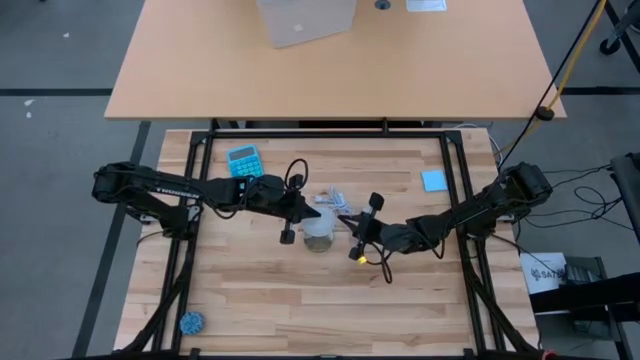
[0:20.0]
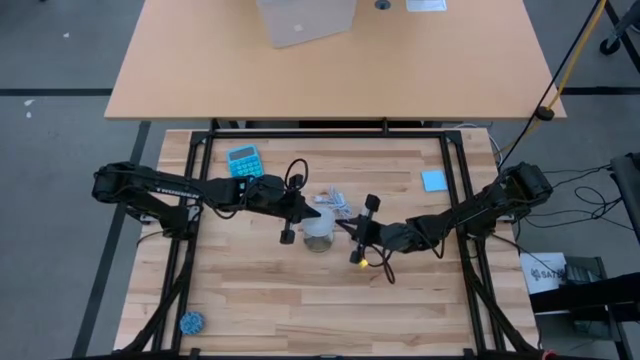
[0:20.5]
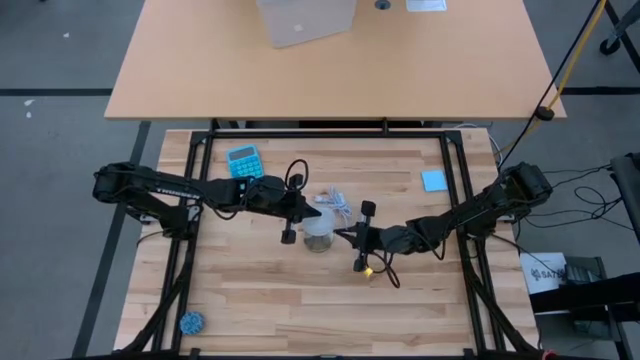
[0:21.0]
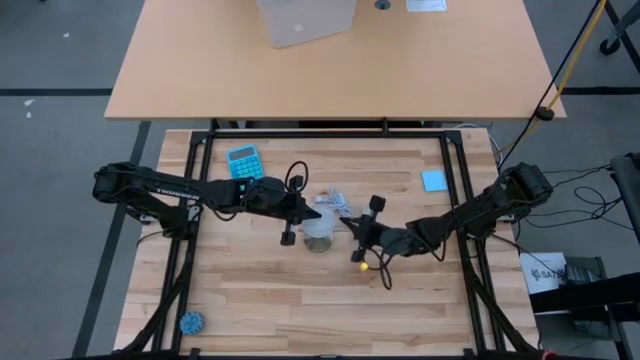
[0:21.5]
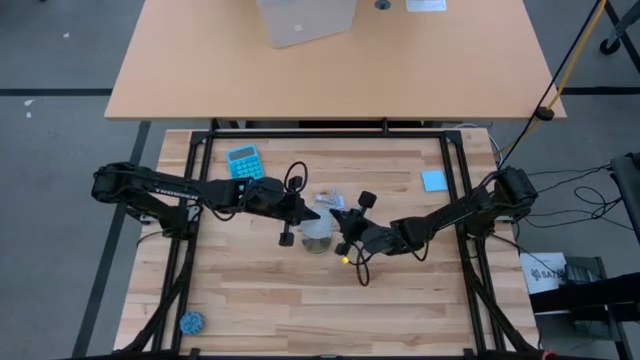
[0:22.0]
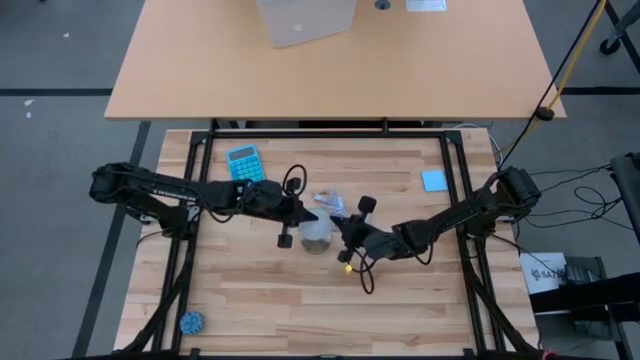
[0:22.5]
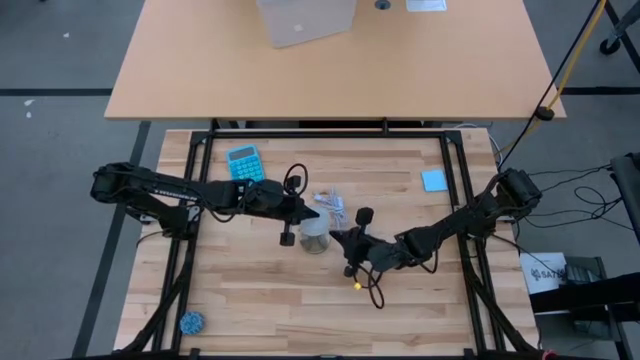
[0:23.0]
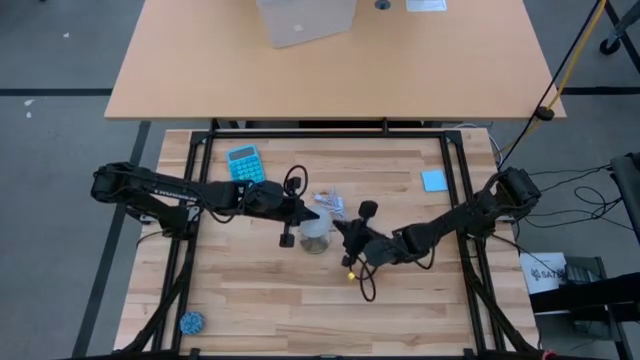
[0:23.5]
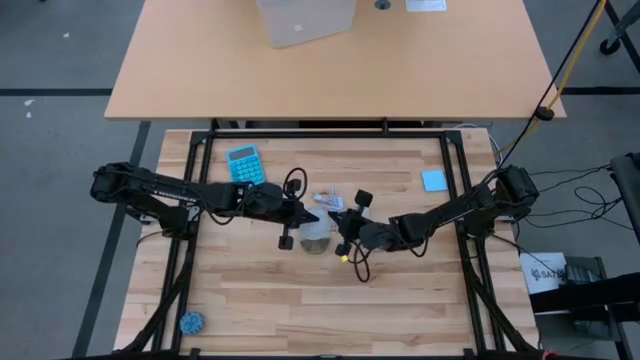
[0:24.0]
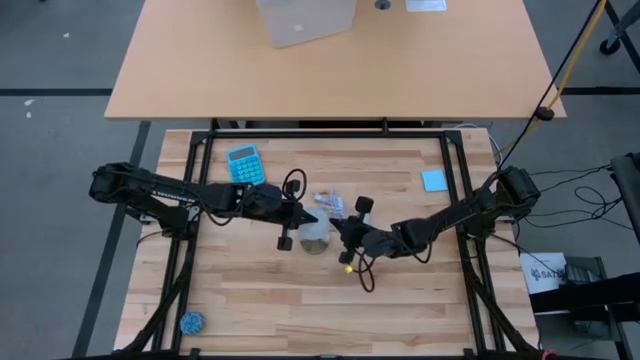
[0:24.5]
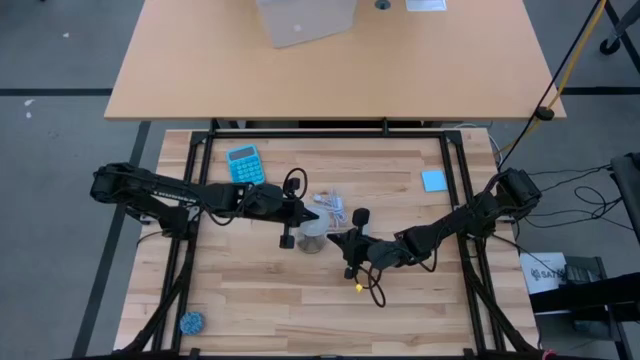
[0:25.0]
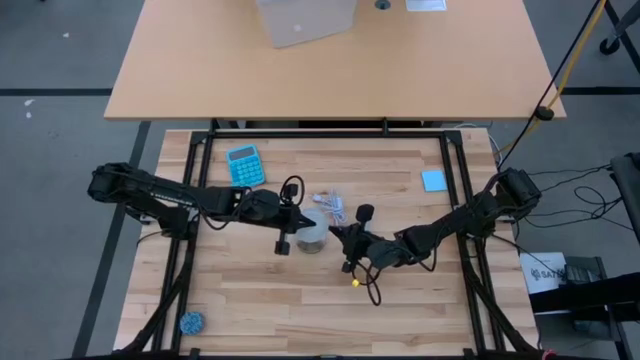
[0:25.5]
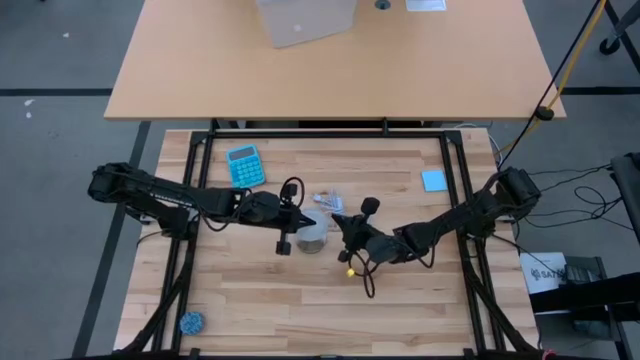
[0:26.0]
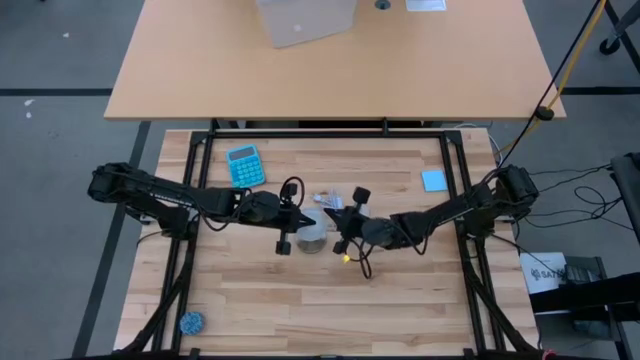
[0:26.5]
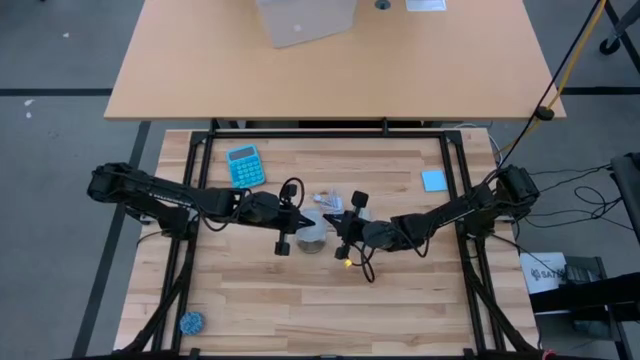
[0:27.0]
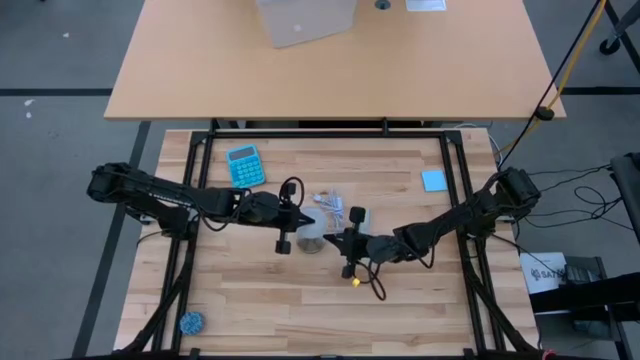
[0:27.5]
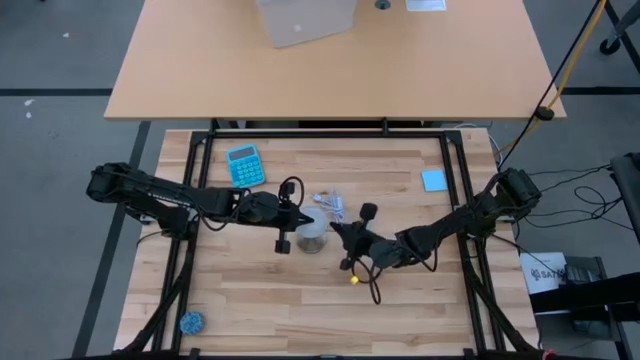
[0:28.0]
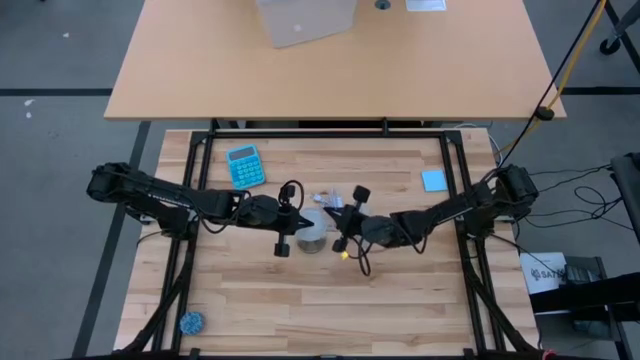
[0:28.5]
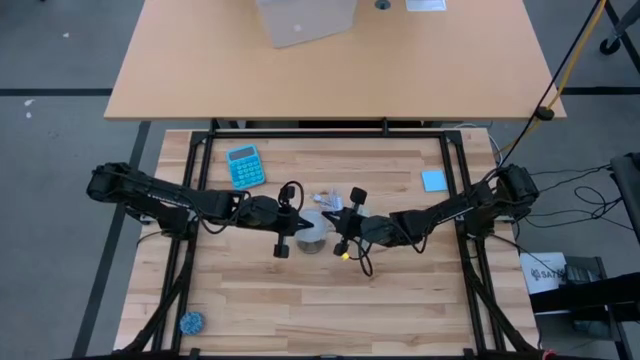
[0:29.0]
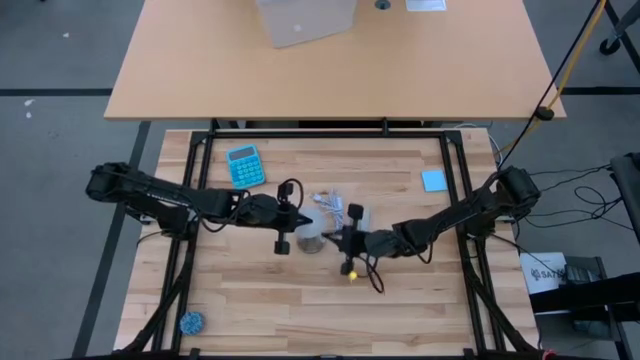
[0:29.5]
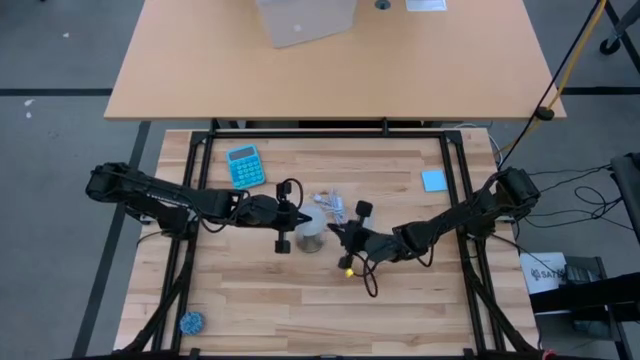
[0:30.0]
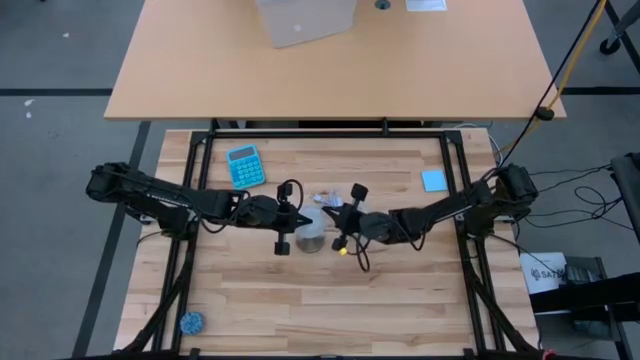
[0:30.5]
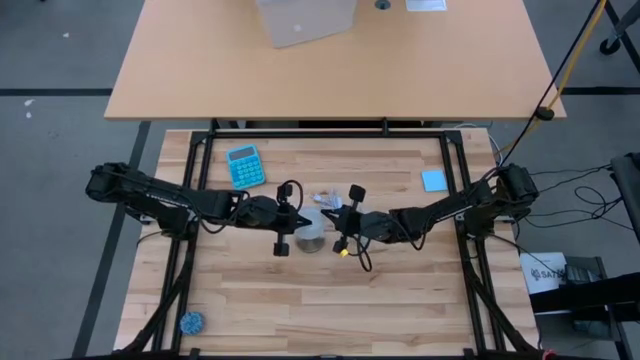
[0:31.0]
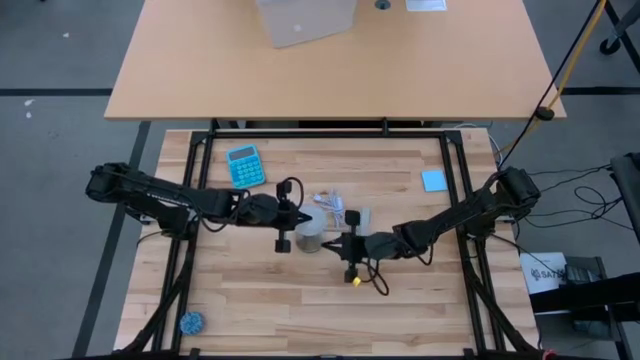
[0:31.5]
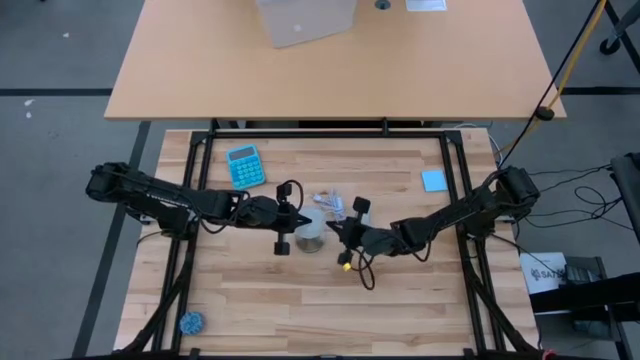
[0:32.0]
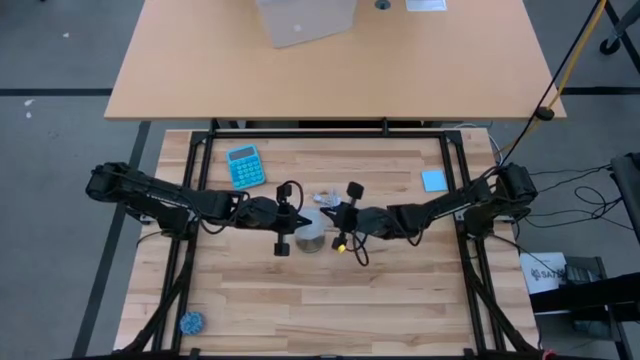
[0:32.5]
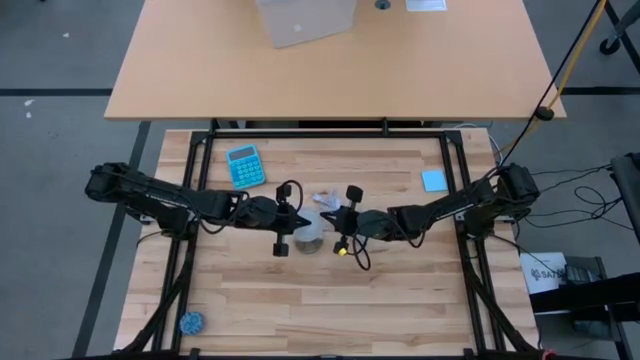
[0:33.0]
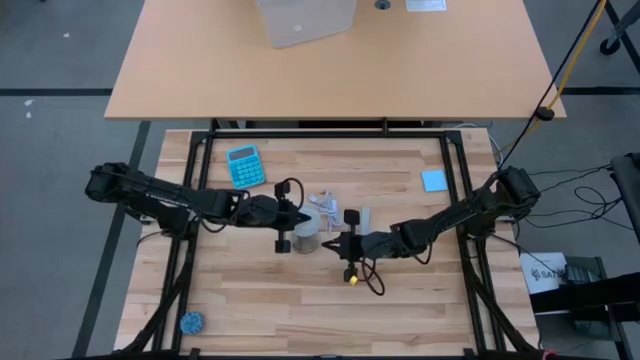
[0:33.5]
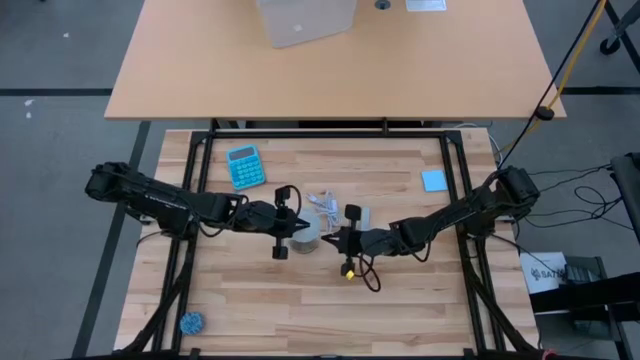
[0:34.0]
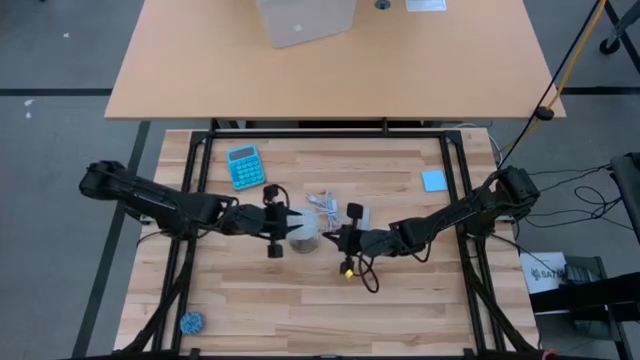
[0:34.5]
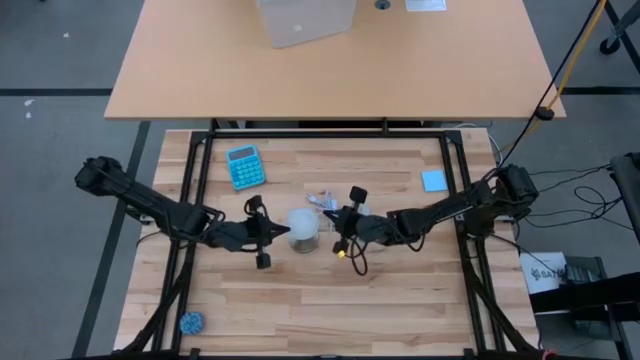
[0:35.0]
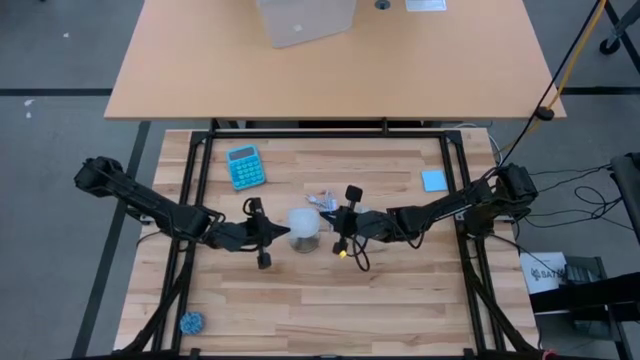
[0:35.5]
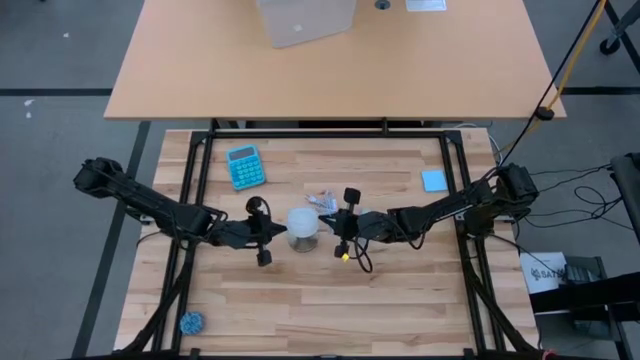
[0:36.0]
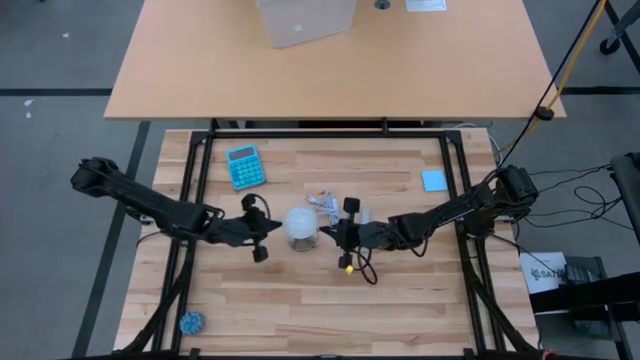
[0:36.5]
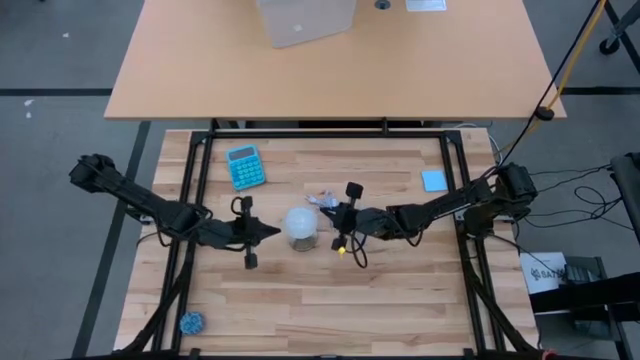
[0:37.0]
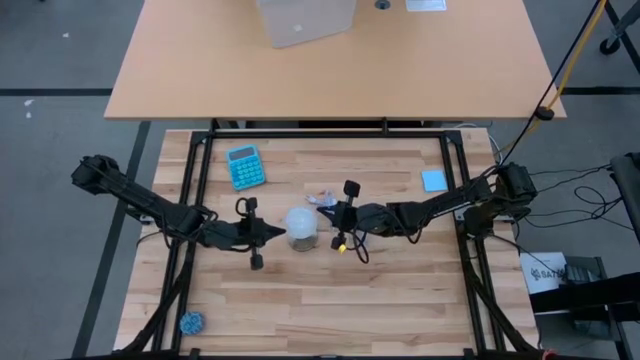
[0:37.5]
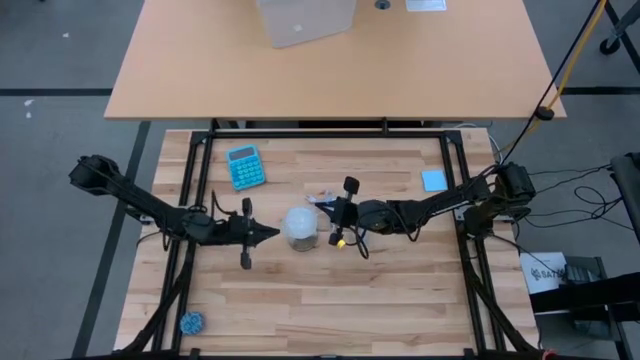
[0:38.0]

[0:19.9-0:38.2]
Task: Screw lightbulb
Insert the light bulb into the lamp
